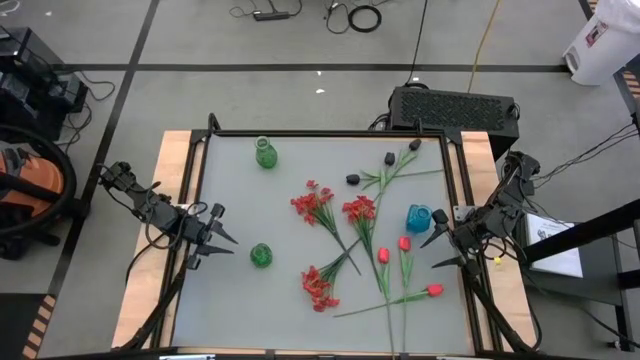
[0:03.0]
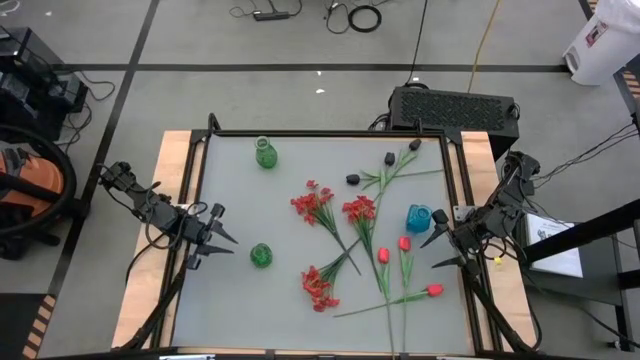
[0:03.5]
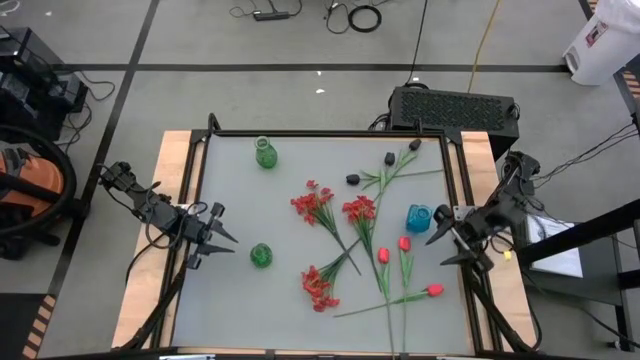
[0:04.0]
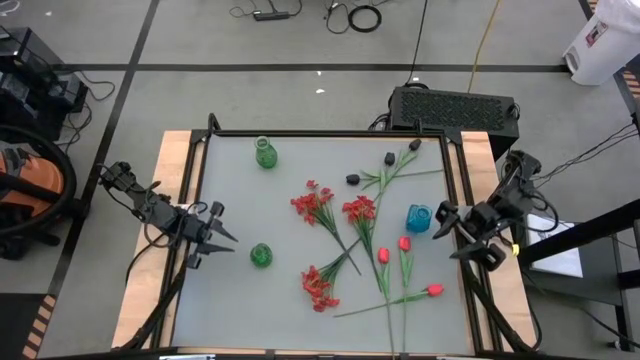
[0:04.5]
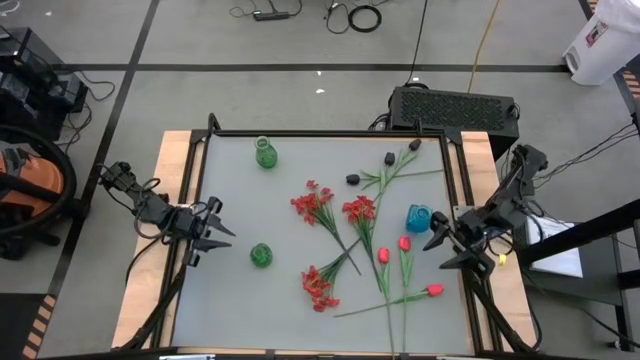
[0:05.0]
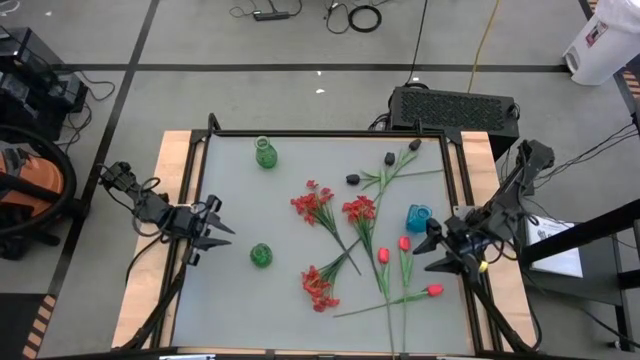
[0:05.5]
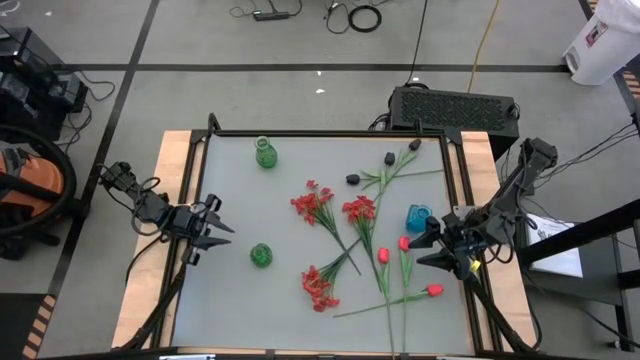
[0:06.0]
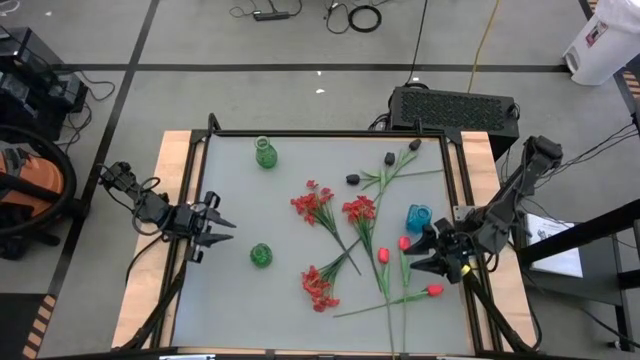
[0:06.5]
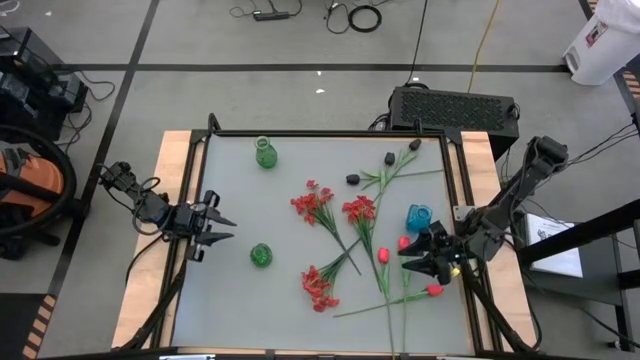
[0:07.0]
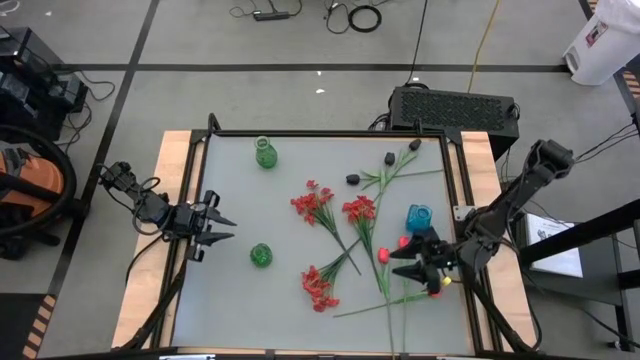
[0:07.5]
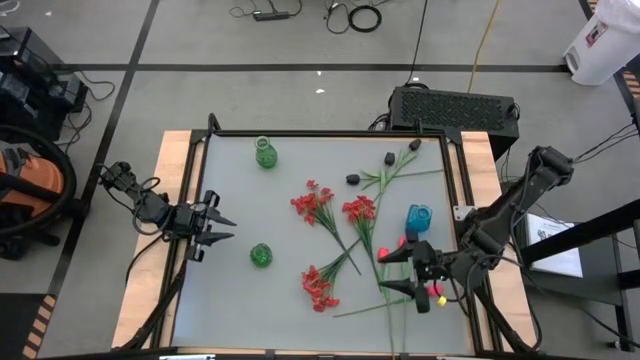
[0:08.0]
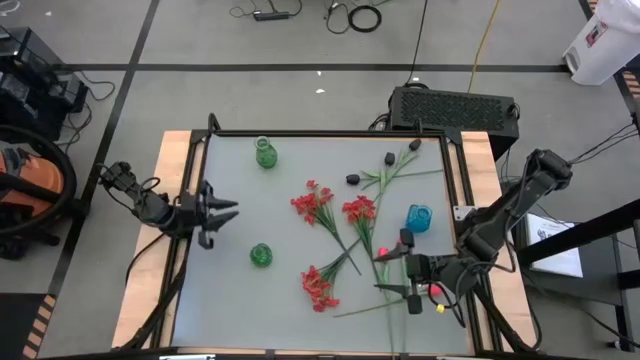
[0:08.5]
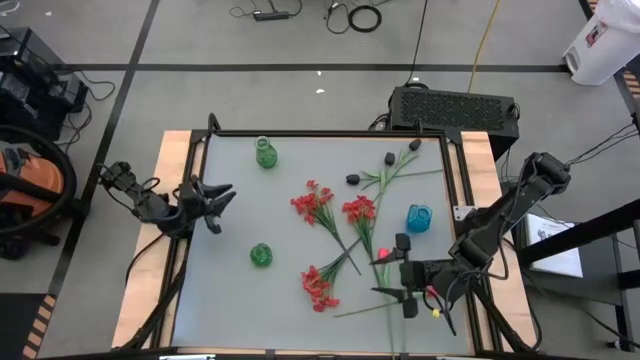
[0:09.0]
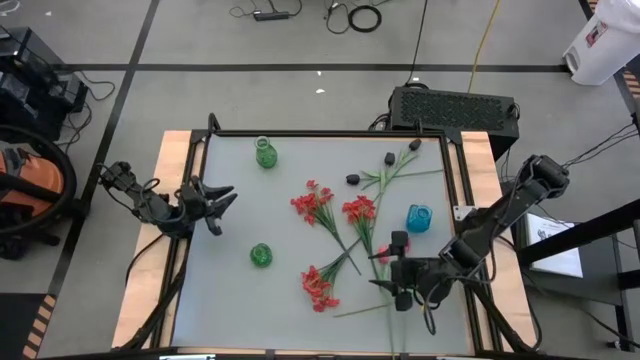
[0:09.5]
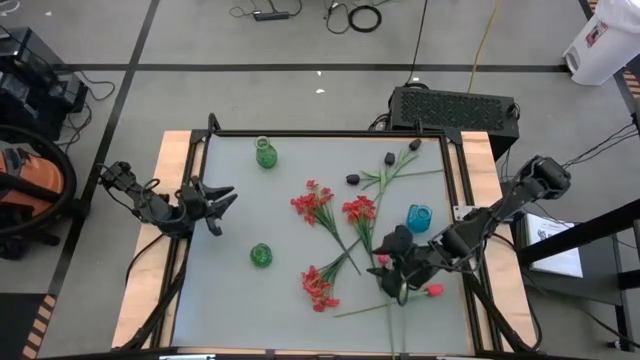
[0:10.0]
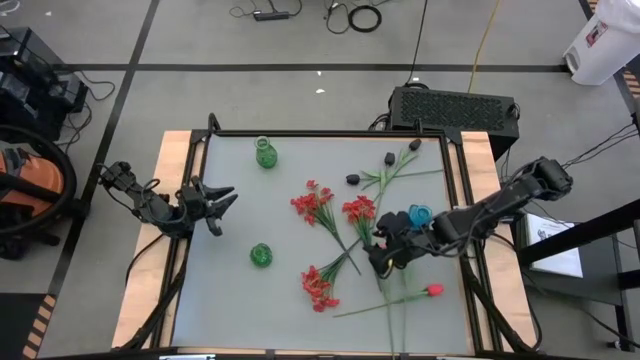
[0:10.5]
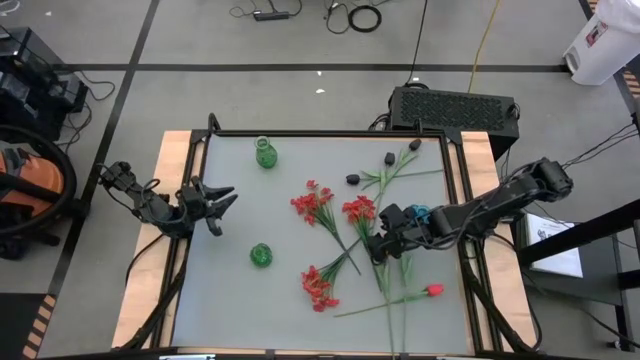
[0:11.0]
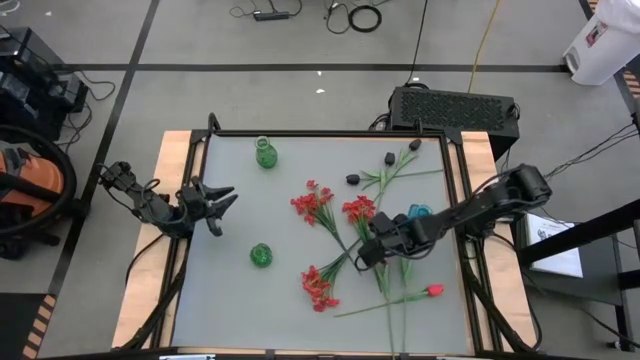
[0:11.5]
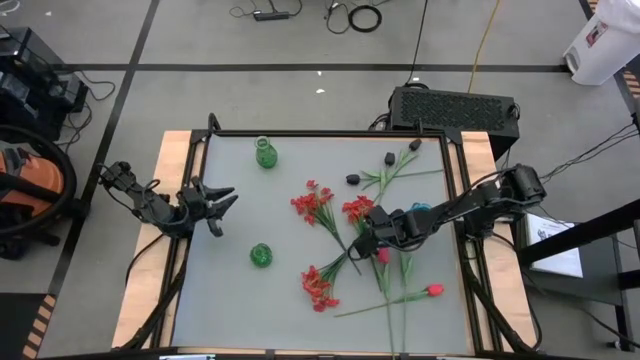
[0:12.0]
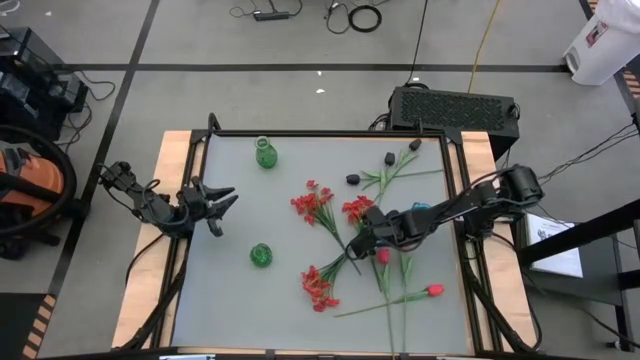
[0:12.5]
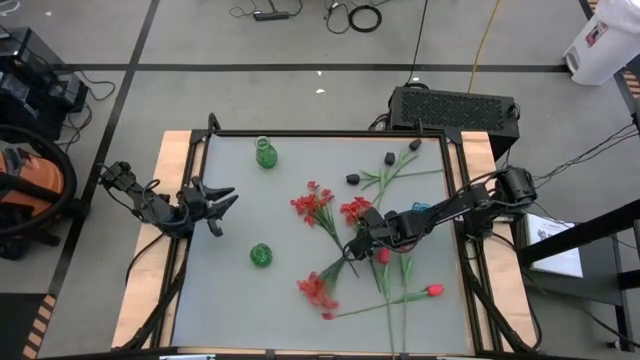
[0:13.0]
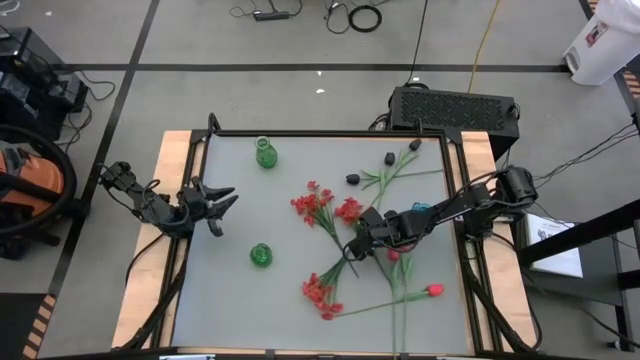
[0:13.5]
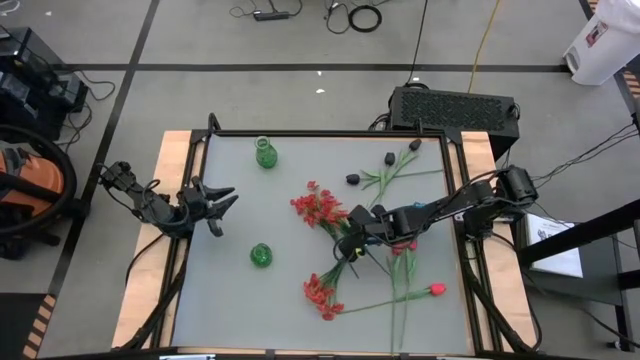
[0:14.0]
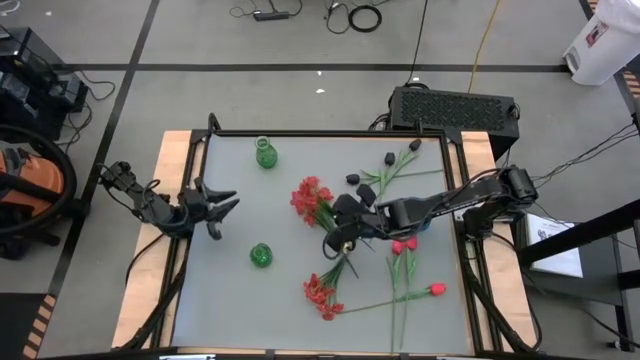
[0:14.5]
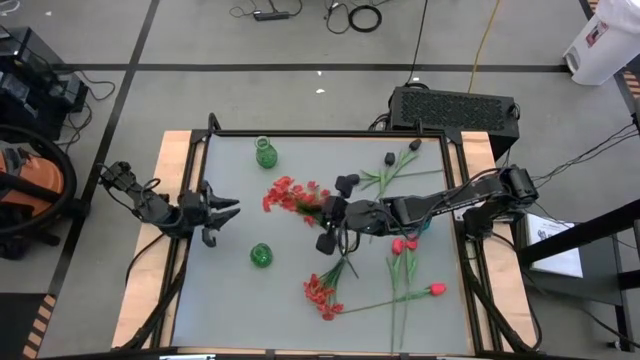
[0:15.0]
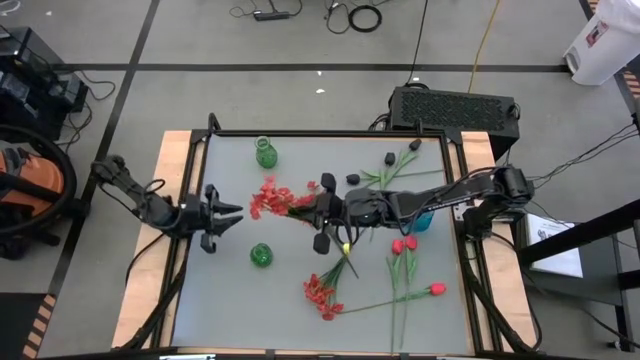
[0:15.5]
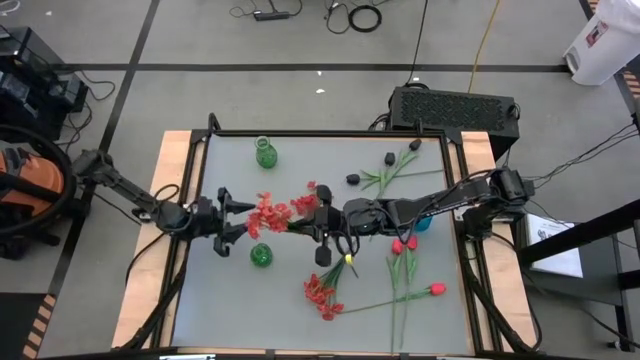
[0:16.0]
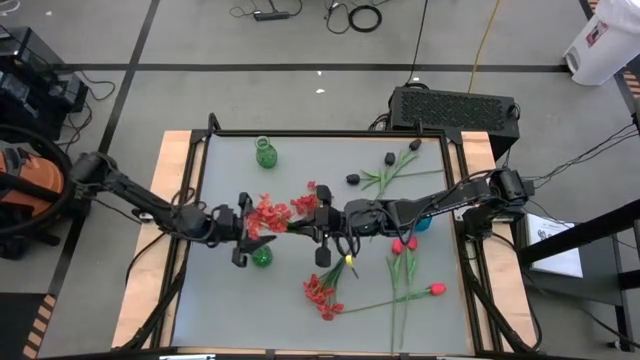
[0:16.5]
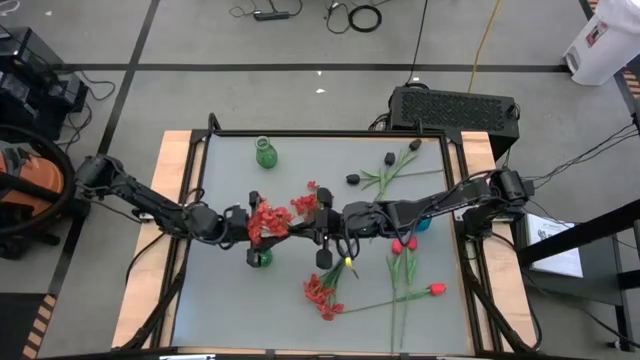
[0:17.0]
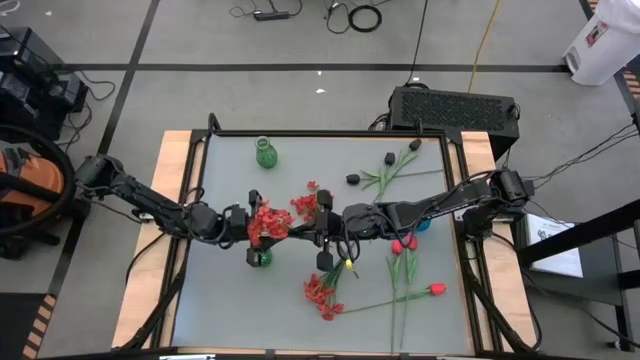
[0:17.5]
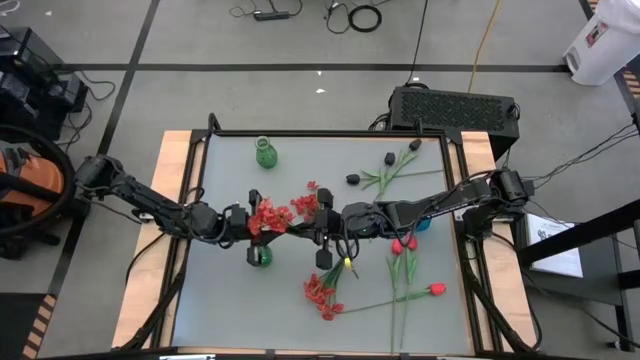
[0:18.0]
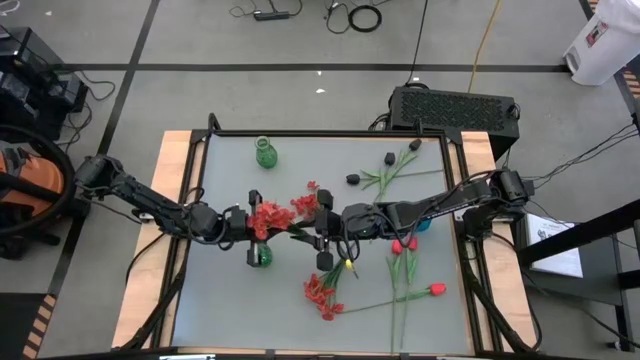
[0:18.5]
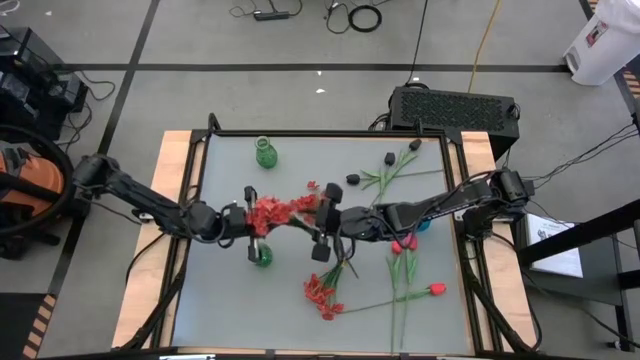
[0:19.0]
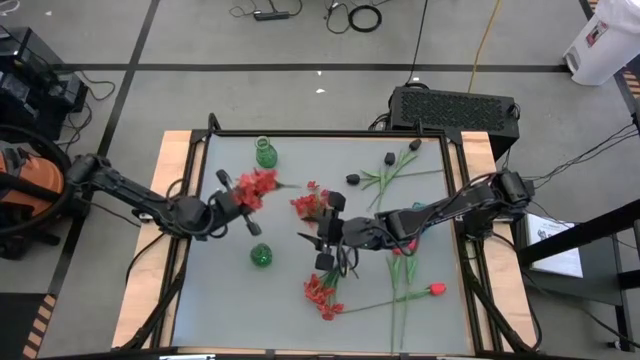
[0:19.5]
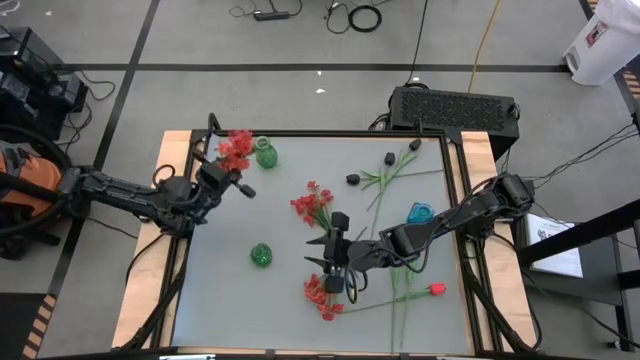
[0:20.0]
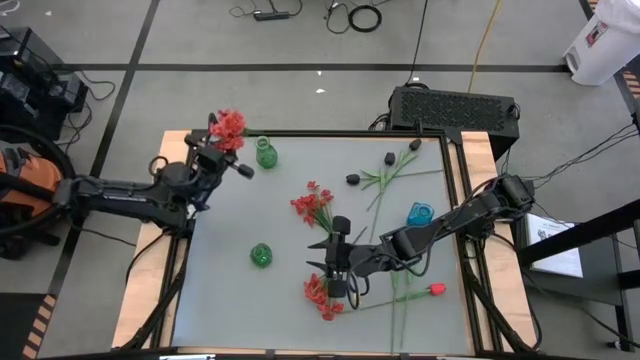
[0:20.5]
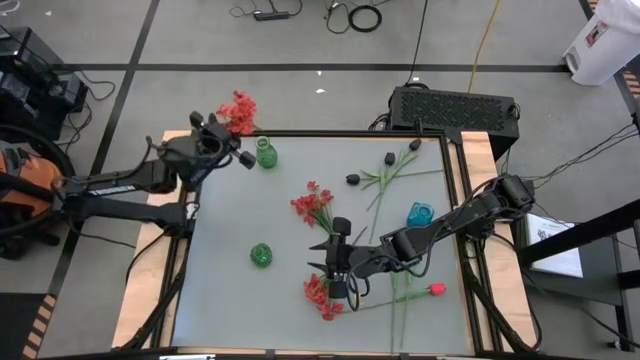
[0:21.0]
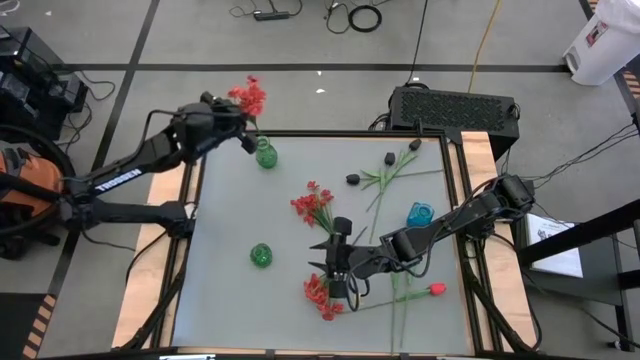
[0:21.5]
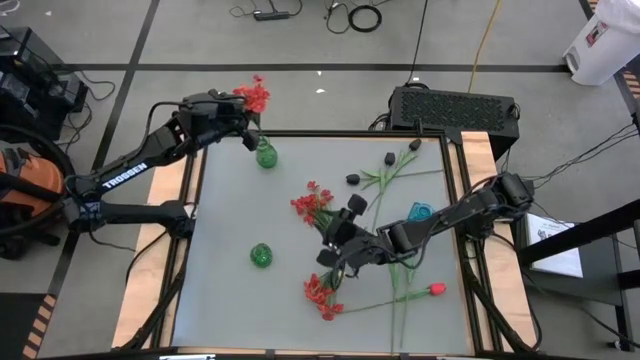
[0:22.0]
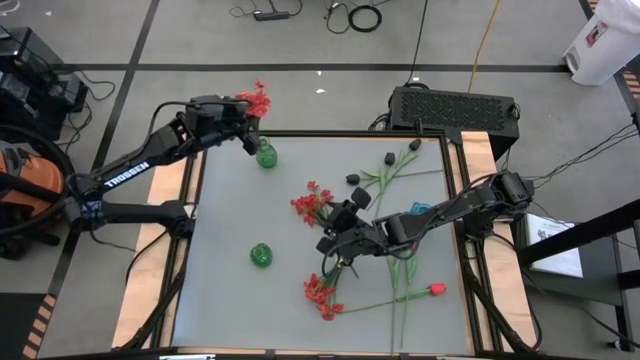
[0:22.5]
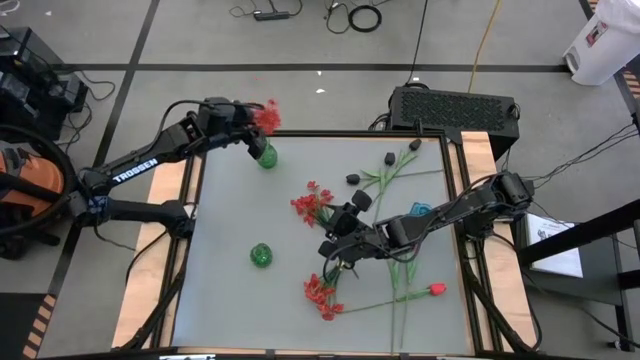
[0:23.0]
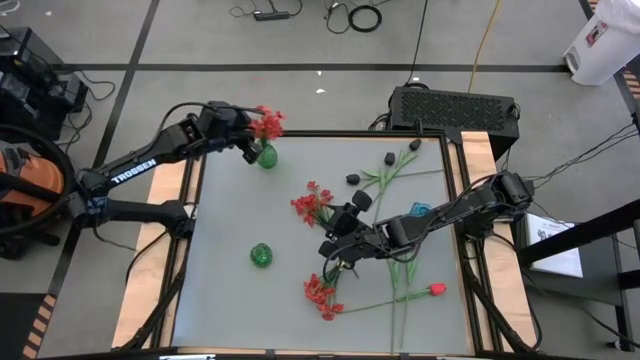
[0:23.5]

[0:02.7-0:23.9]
Task: Sort flowers into vase by color
Put the left orange flowers into the top green vase
